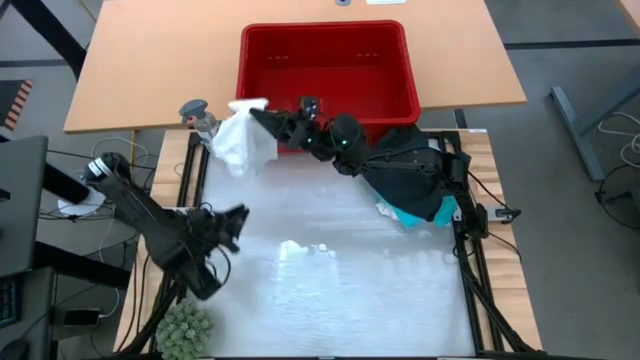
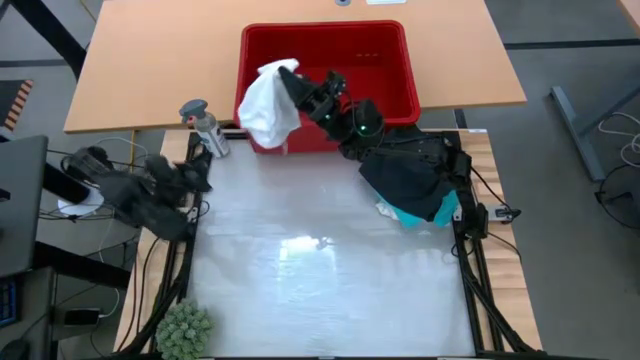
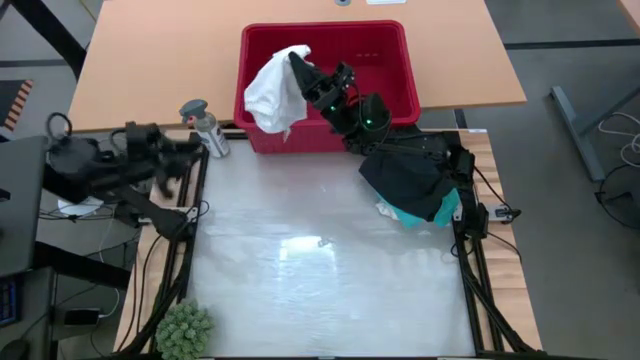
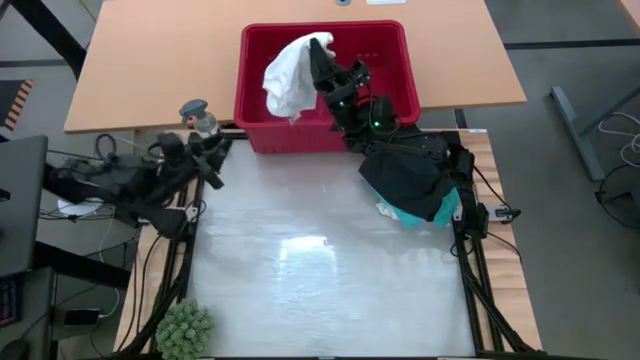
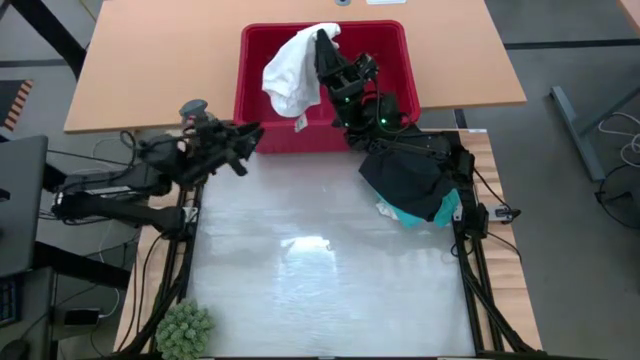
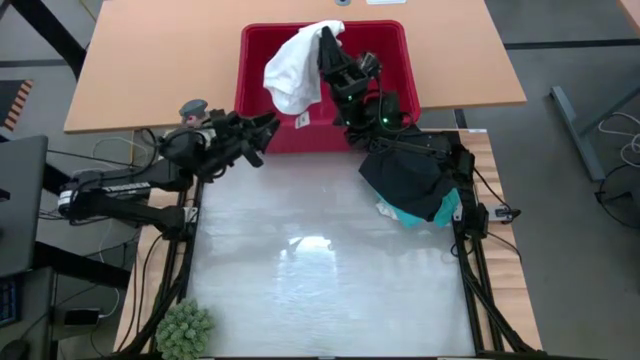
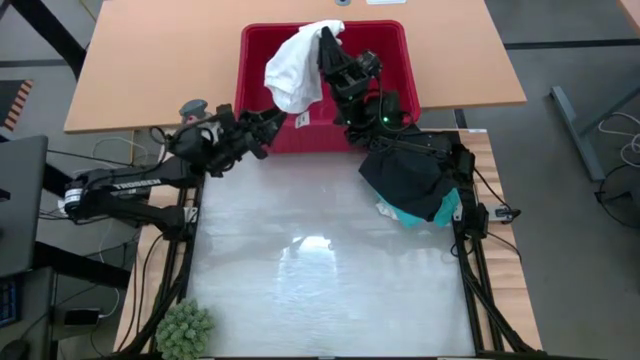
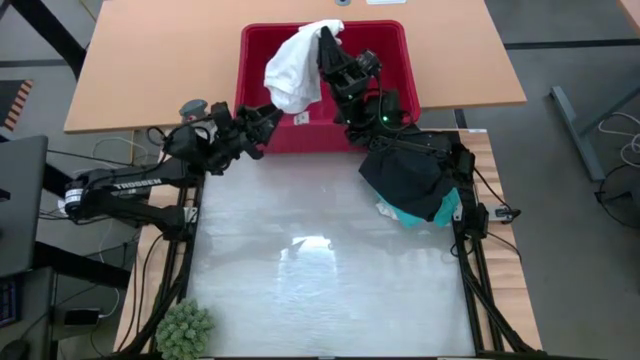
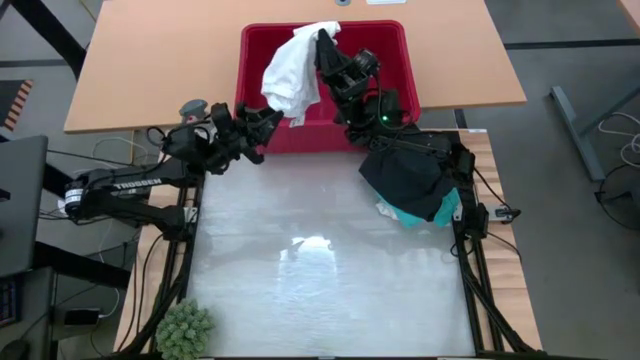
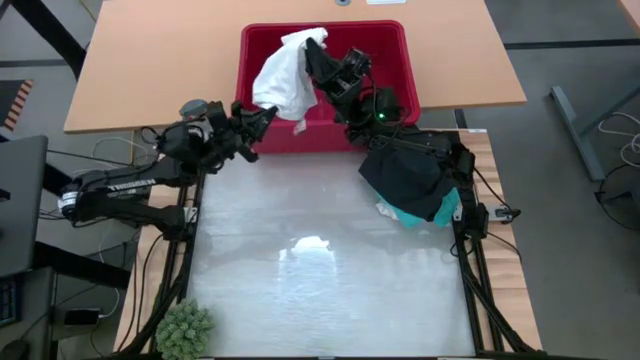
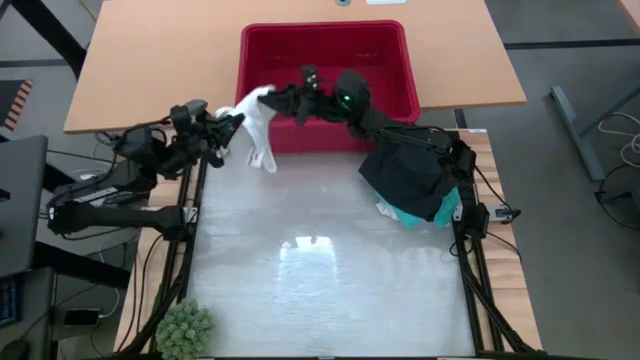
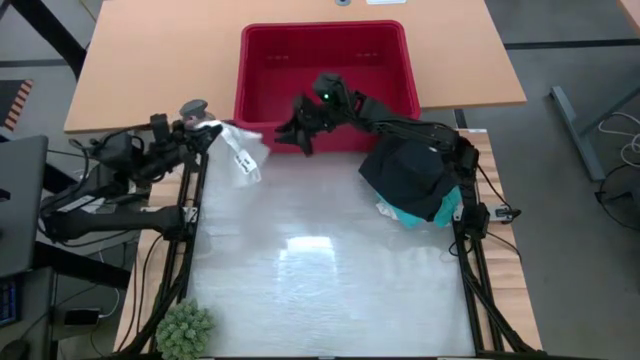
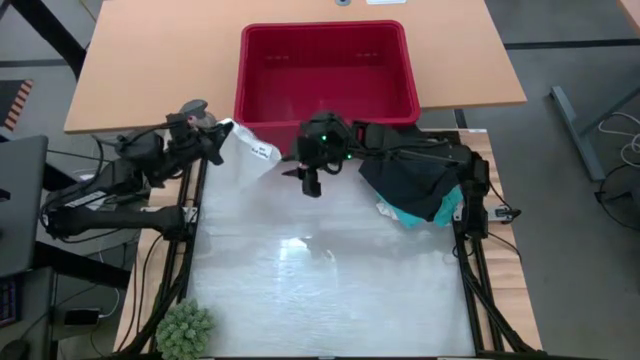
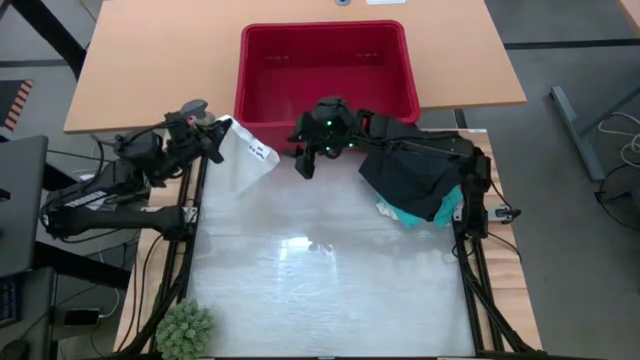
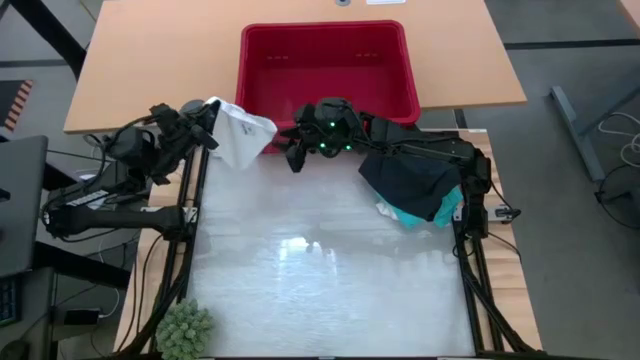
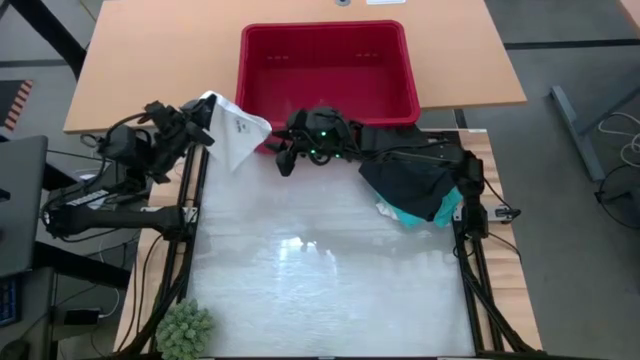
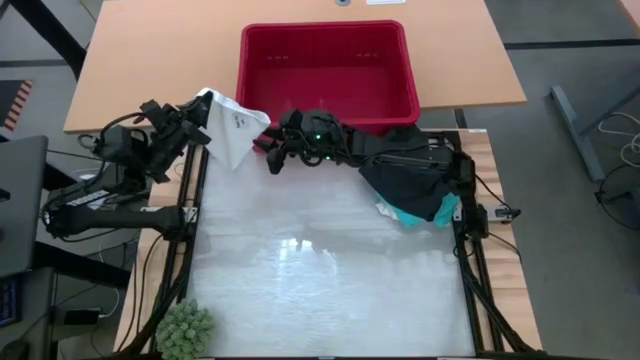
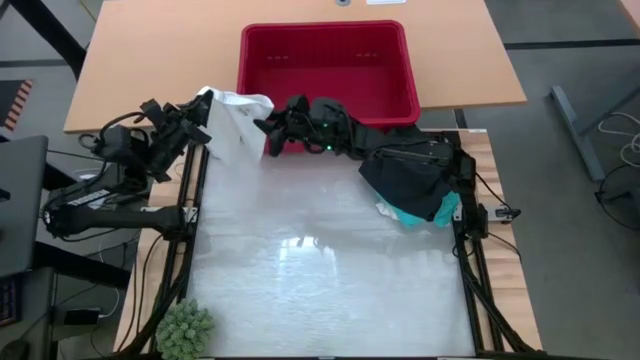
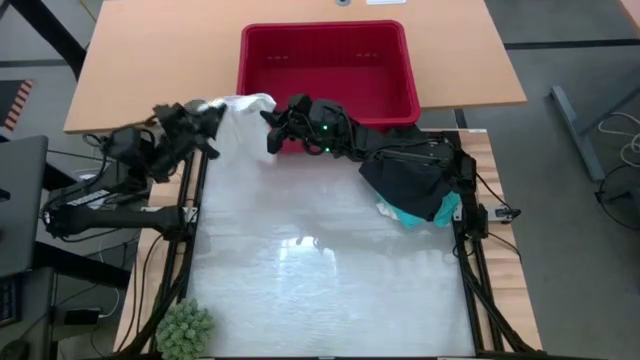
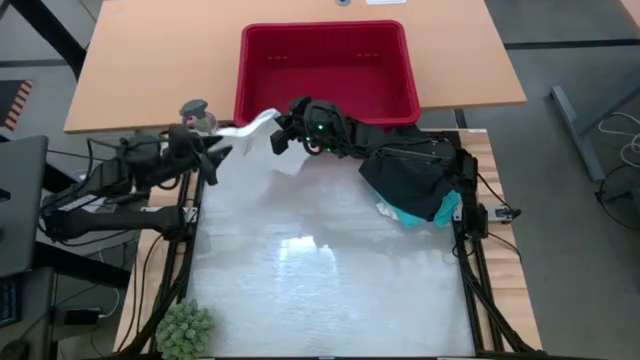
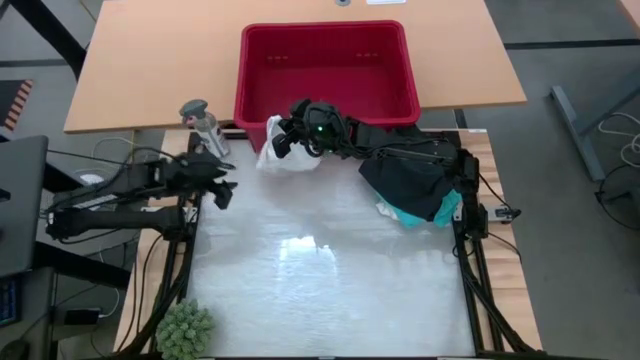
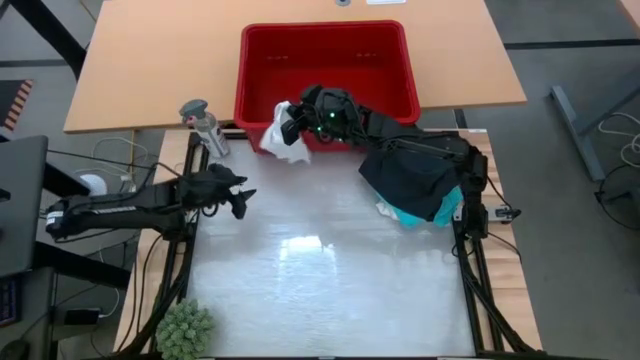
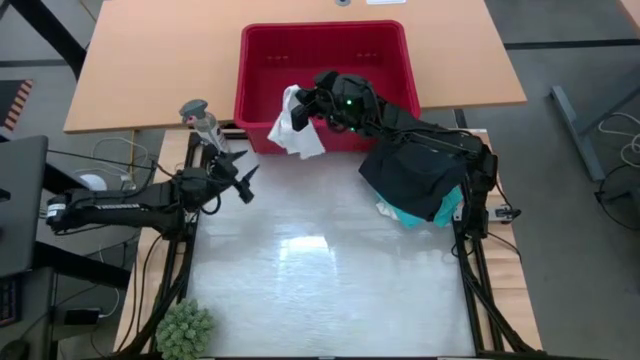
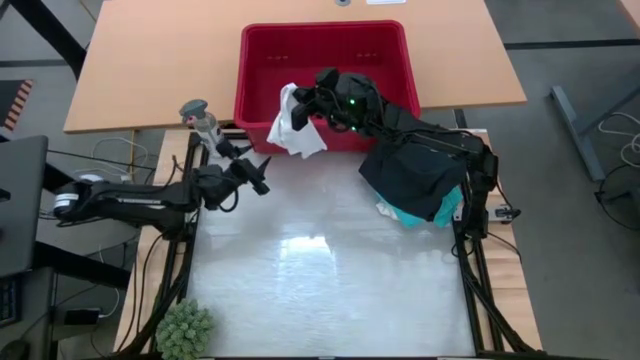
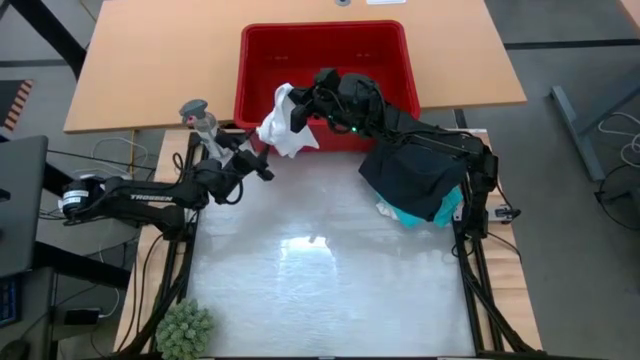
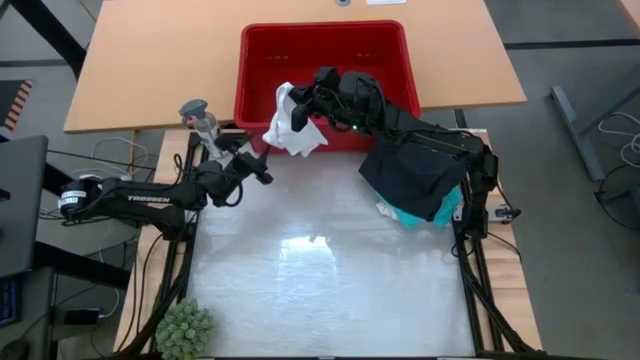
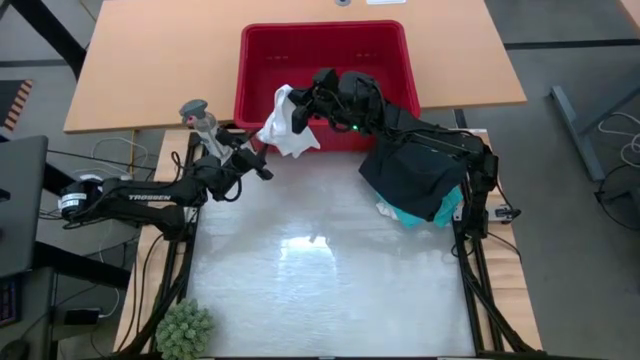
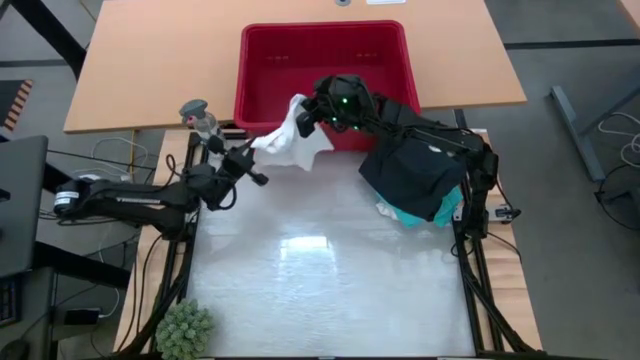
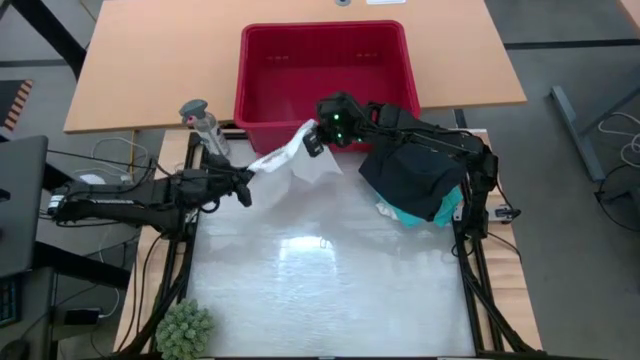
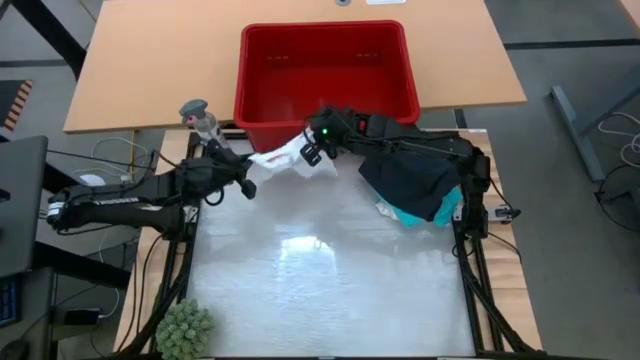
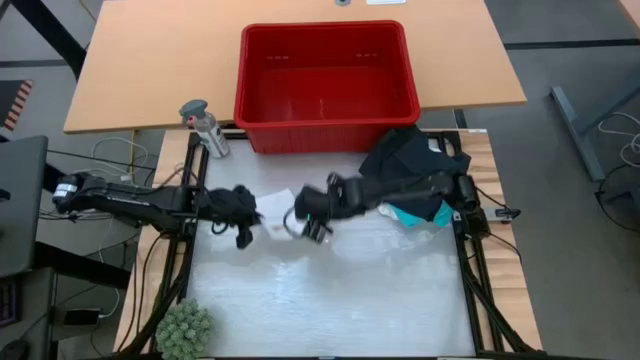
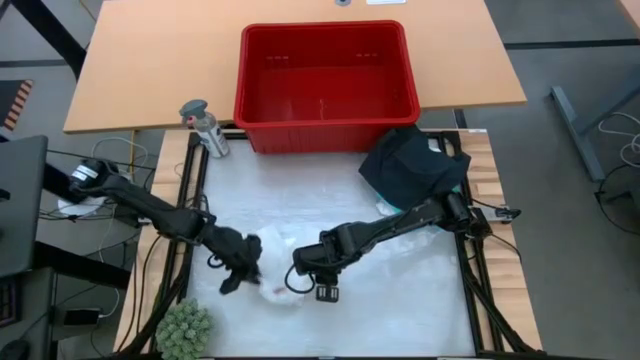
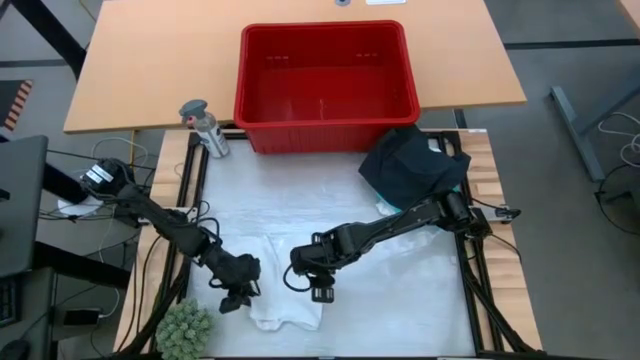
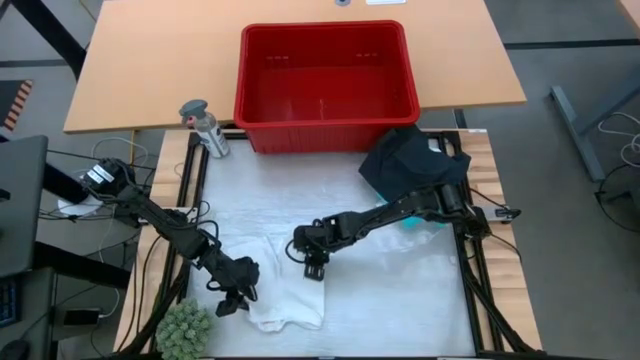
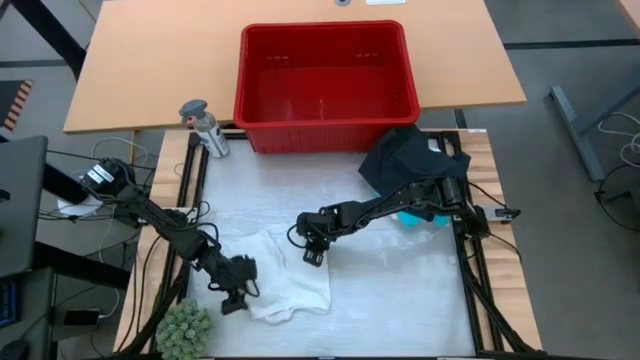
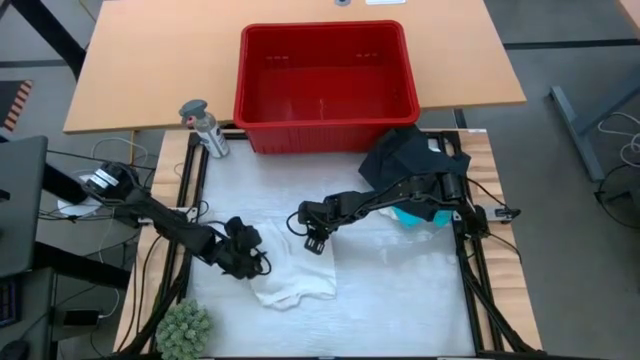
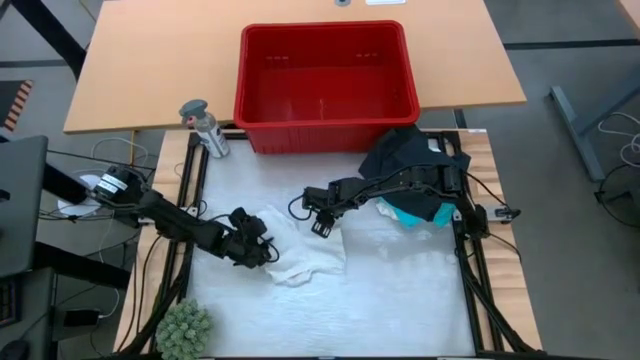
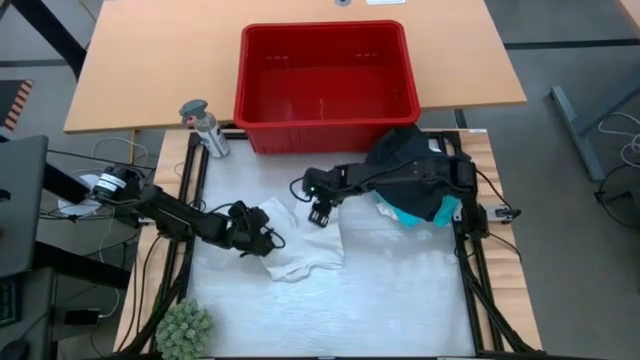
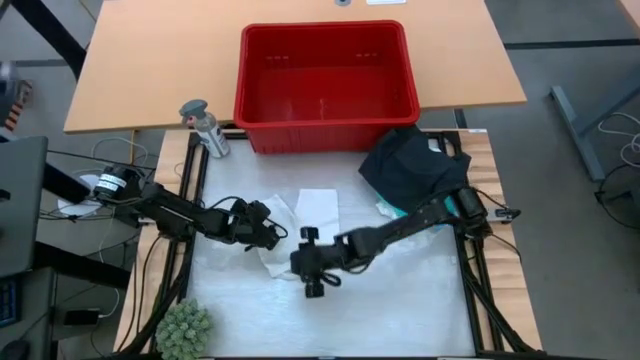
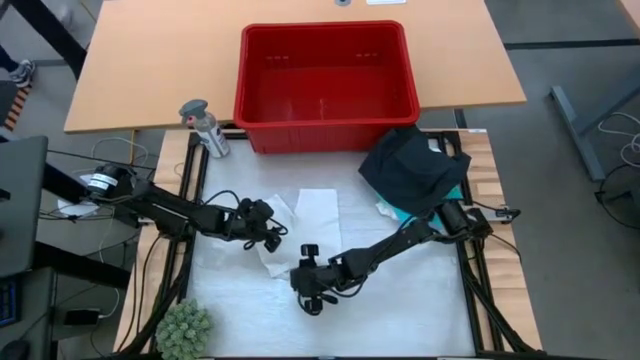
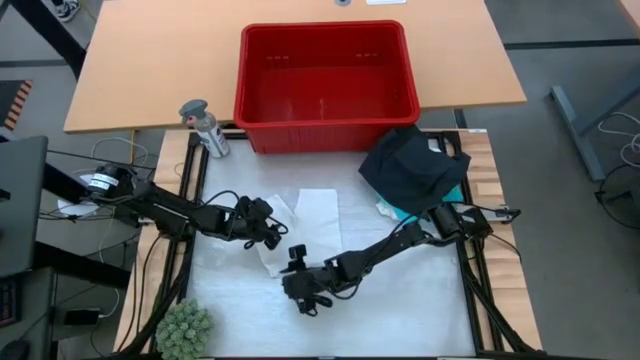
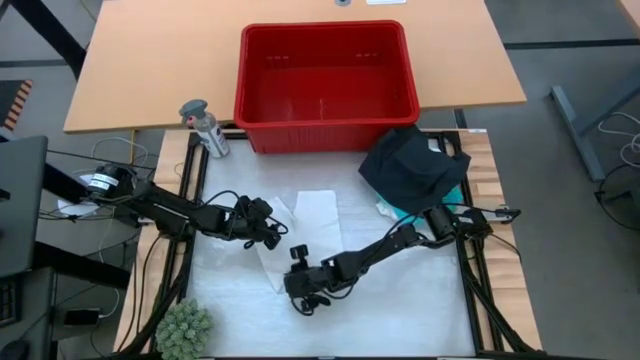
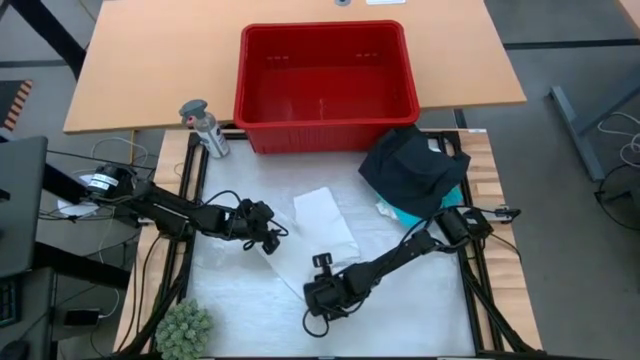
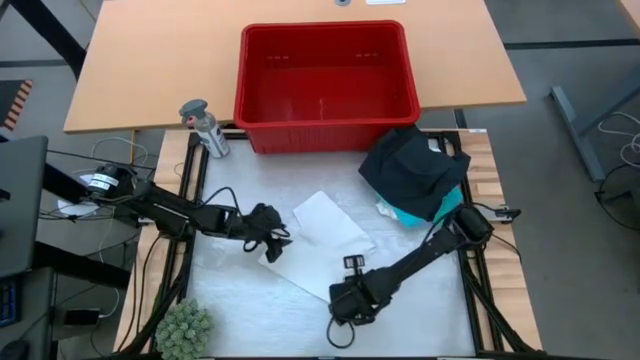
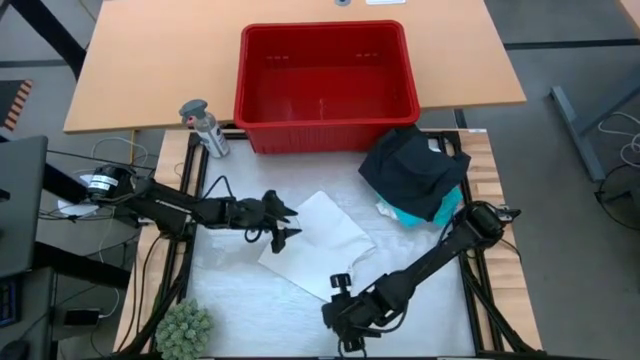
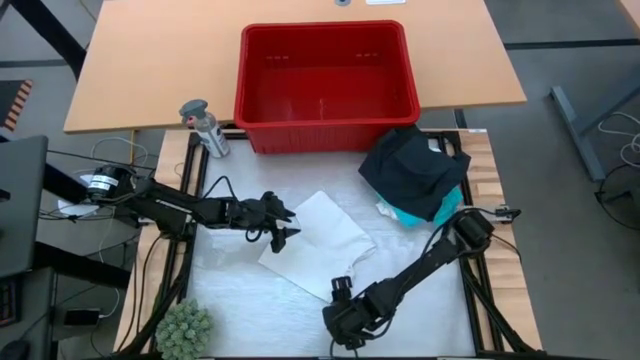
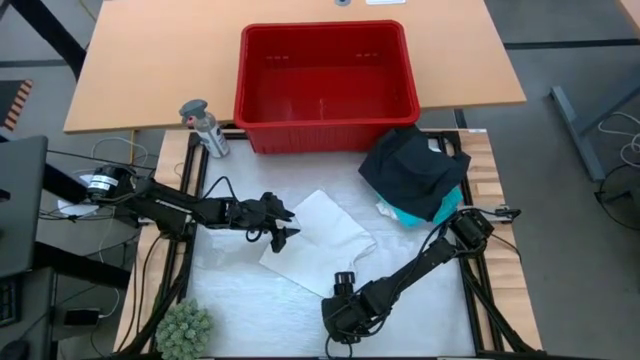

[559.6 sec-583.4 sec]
Task: Fold Laundry from Bin
Fold the white underwear
